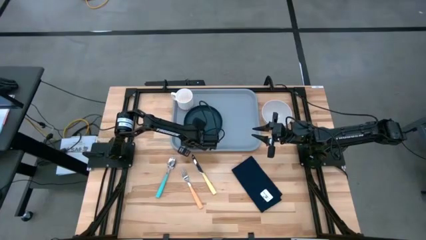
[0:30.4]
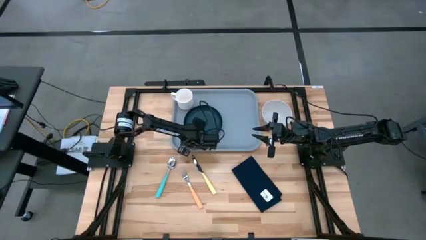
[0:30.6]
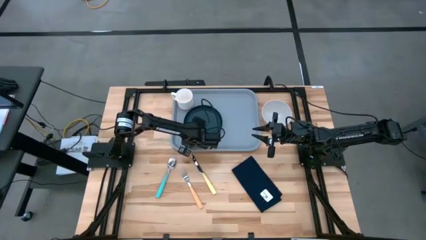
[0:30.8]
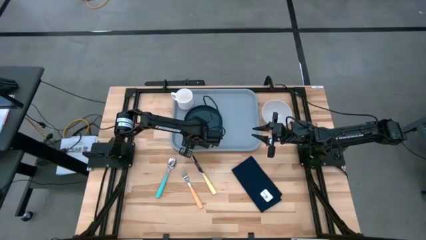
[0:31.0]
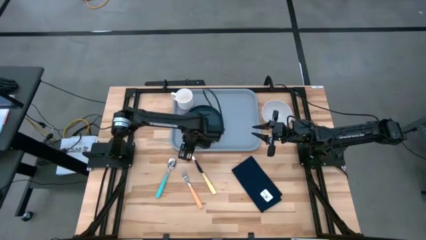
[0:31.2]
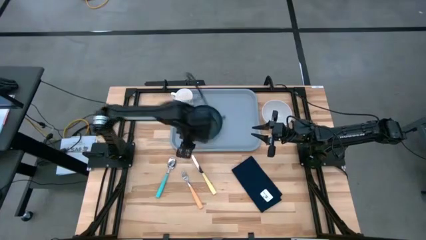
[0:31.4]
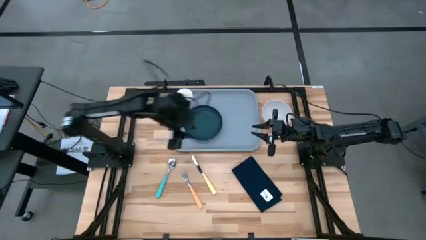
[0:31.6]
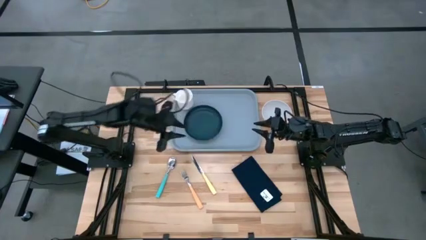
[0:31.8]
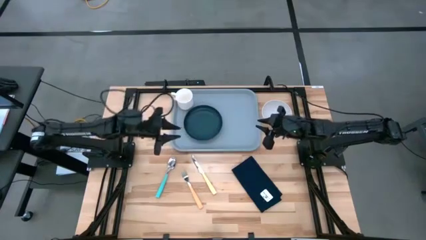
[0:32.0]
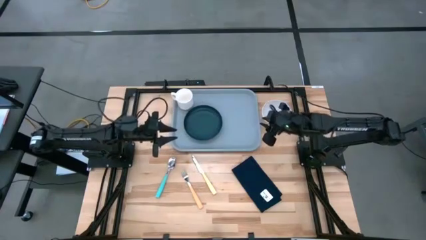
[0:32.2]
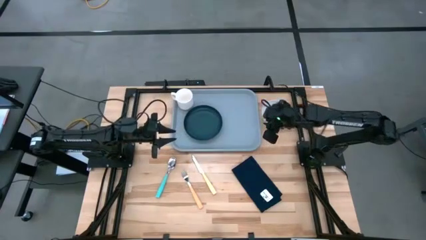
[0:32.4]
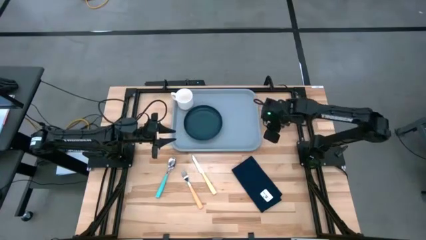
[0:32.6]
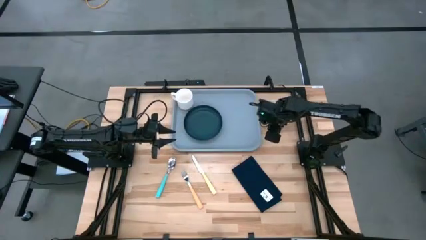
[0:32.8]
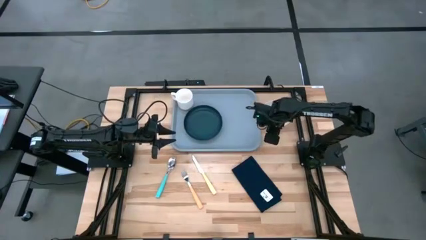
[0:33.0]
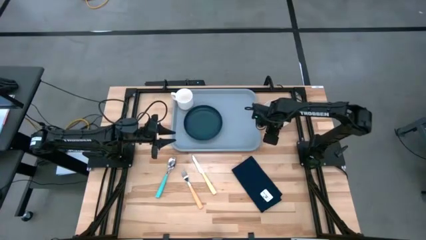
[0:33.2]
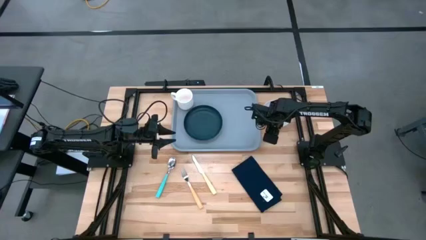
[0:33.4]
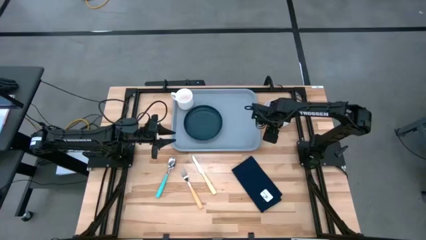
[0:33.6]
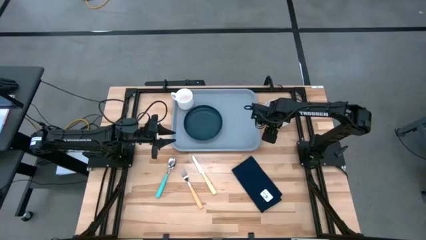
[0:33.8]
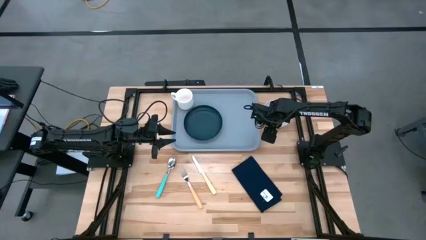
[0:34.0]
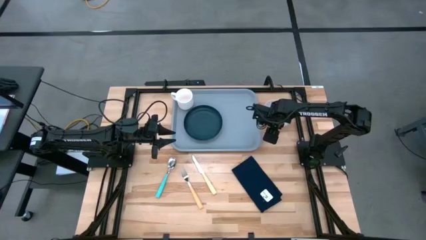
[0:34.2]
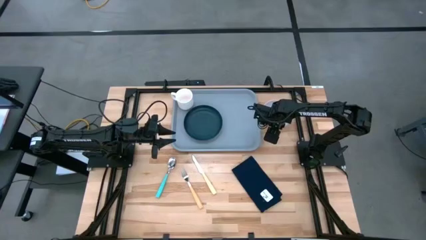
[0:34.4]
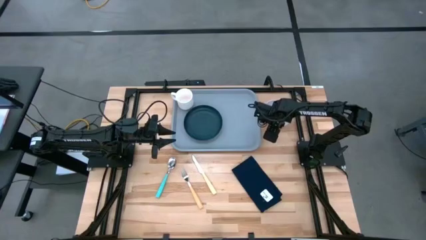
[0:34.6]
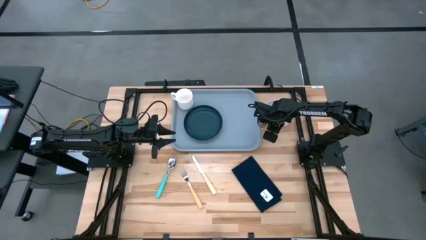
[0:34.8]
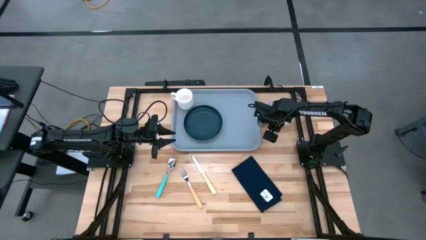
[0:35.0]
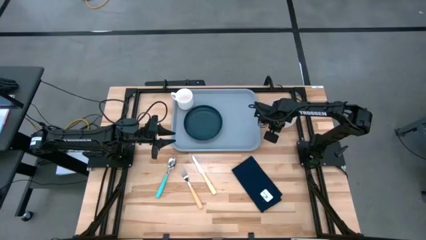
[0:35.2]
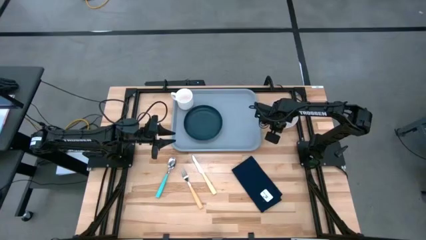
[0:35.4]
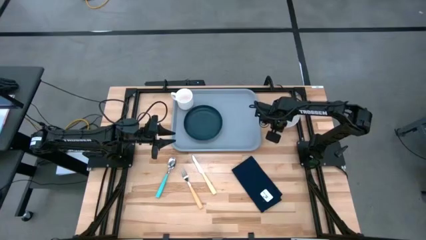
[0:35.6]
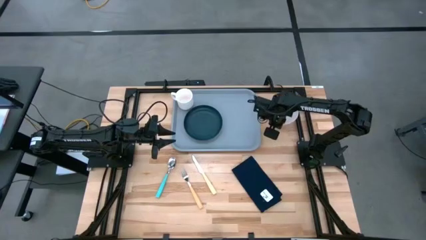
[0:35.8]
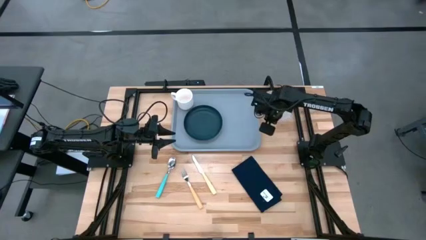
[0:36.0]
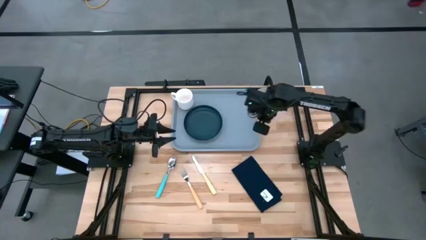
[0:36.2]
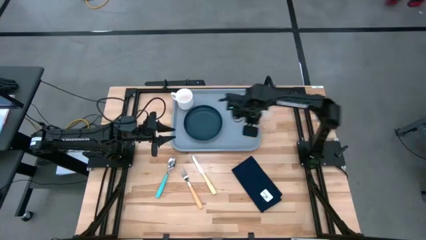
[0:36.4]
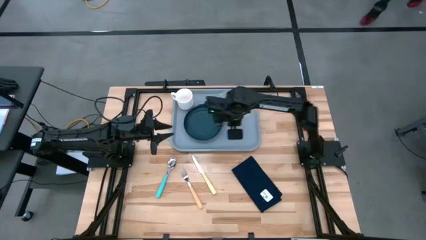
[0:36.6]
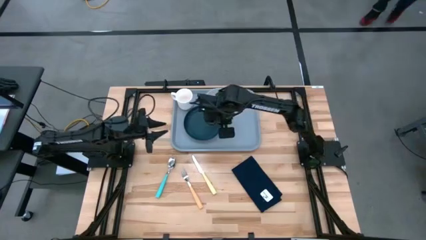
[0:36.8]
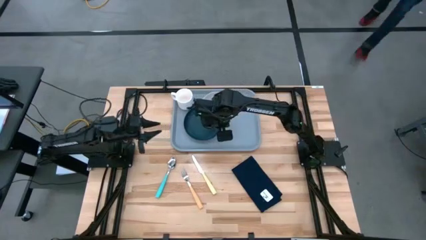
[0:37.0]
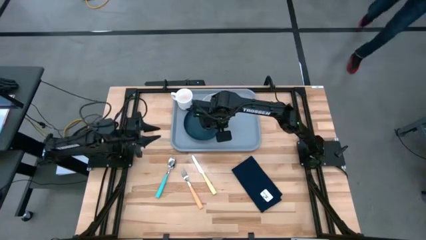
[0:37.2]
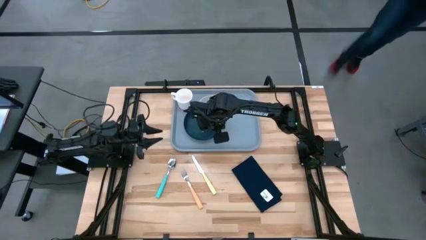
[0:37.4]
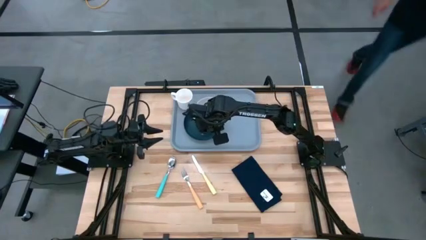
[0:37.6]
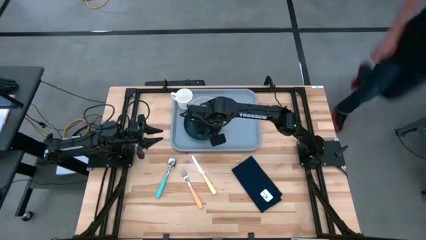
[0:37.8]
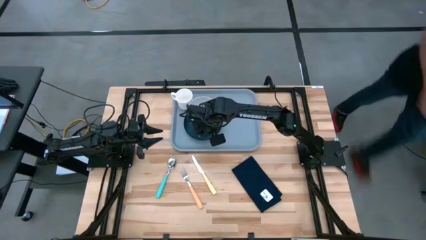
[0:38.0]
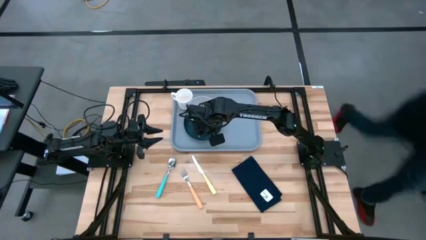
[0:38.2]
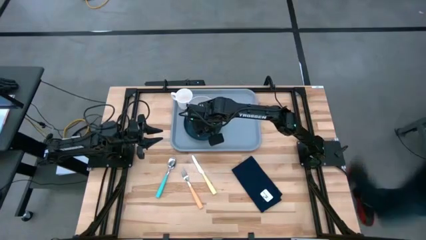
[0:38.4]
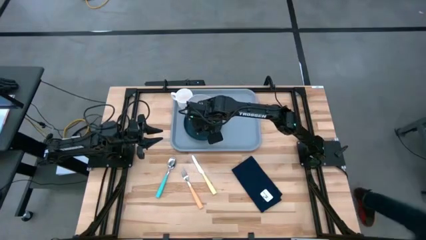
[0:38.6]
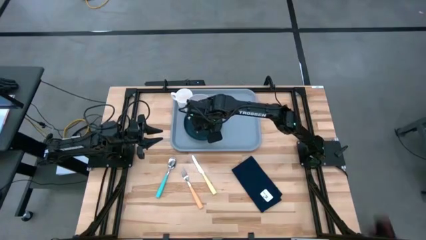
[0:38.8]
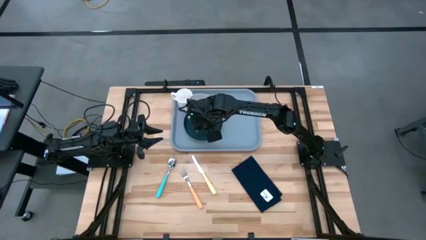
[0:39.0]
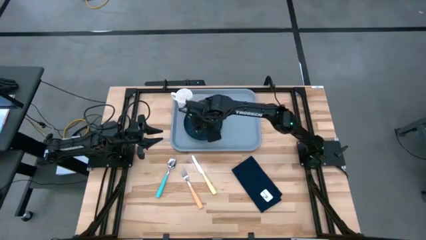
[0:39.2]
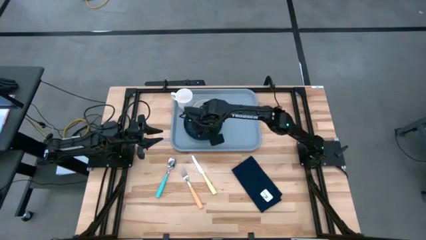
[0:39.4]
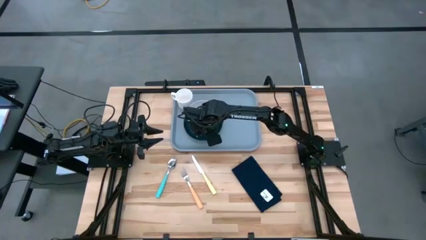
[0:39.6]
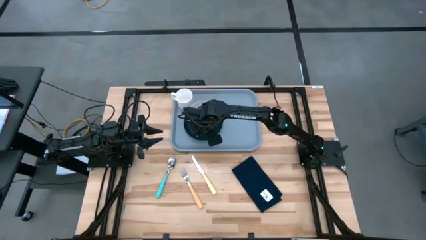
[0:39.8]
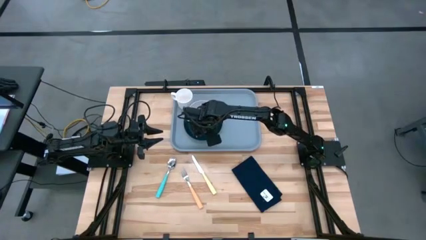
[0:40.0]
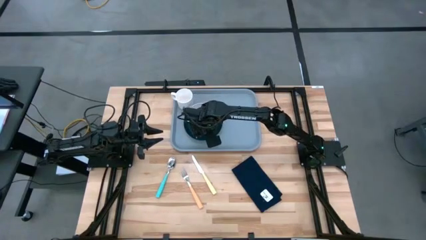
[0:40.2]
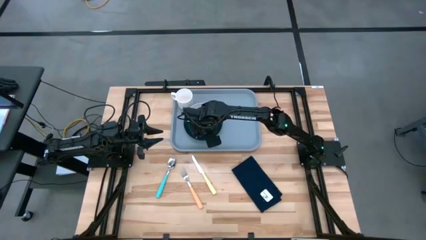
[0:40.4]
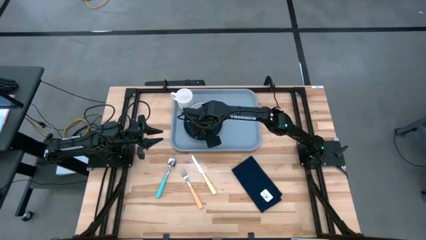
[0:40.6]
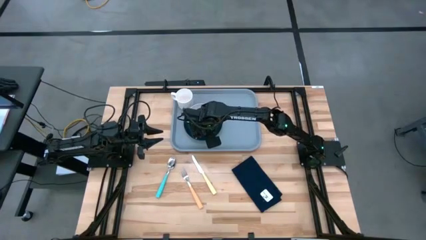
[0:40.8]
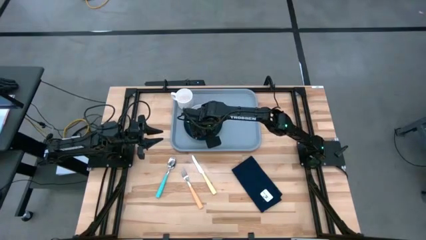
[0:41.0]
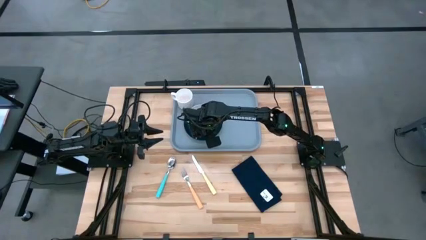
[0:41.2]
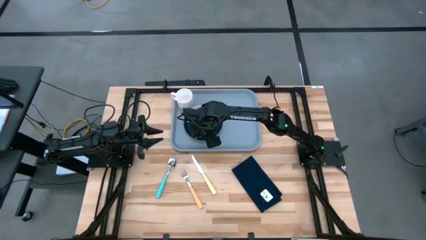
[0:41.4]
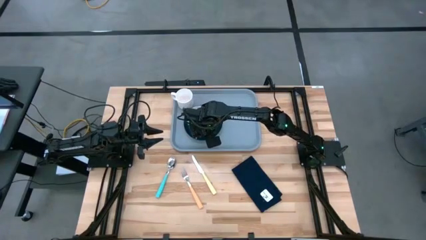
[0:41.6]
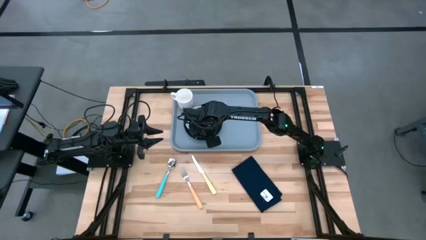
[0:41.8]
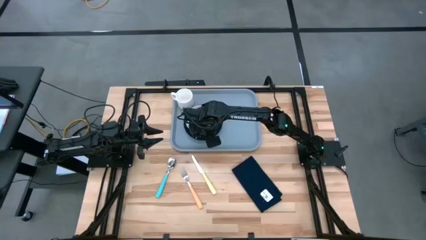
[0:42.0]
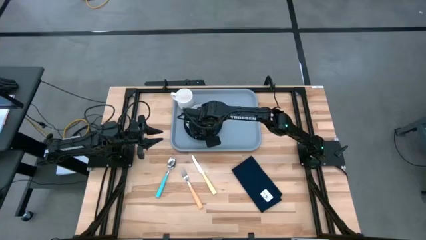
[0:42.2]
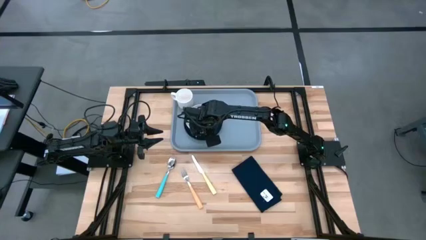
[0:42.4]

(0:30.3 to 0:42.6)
Task: Set up tray
Put the white bowl on the black plate on the gray serving tray
